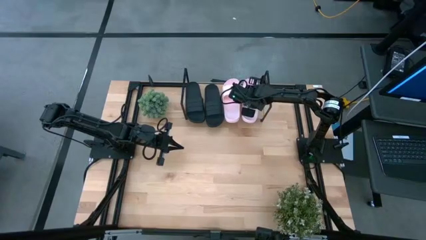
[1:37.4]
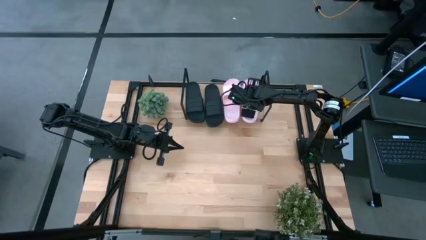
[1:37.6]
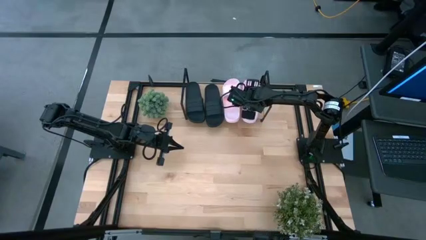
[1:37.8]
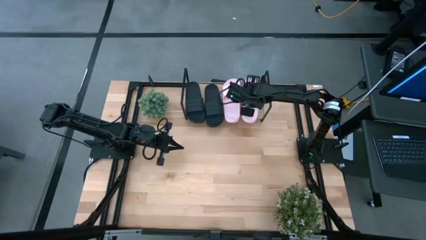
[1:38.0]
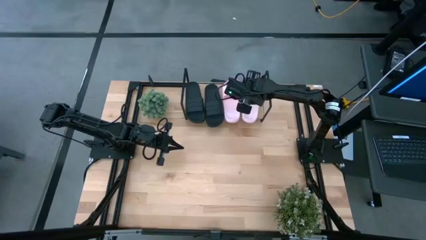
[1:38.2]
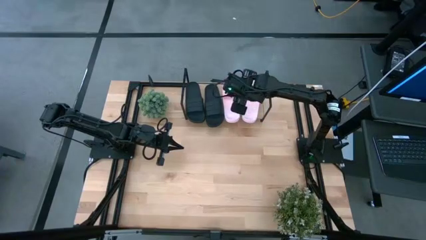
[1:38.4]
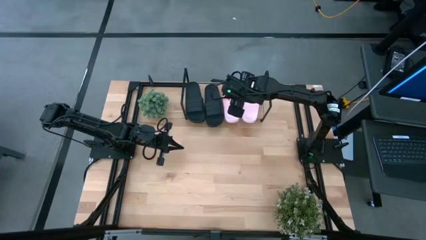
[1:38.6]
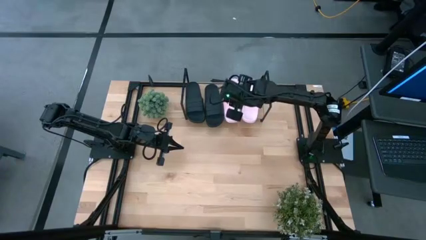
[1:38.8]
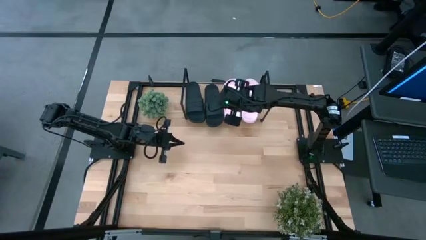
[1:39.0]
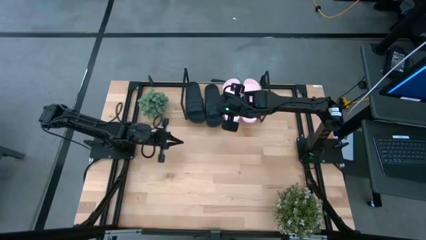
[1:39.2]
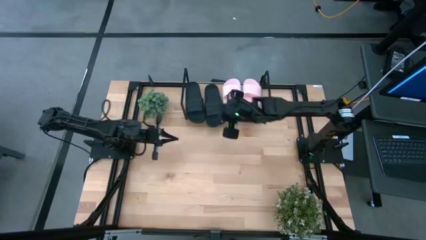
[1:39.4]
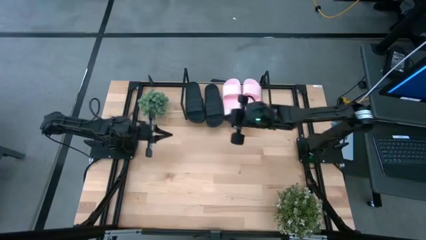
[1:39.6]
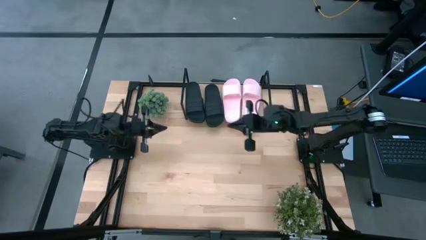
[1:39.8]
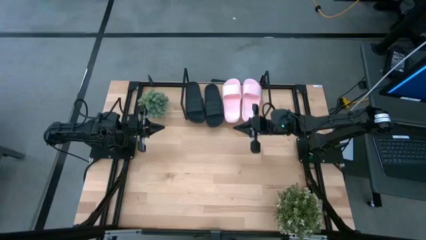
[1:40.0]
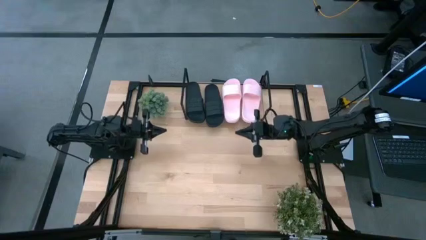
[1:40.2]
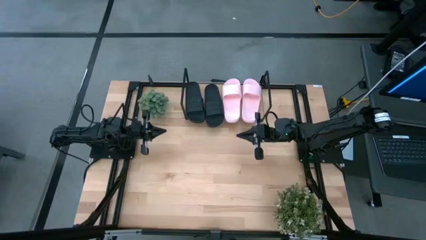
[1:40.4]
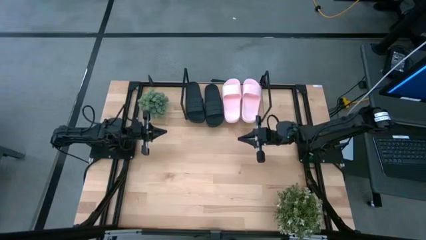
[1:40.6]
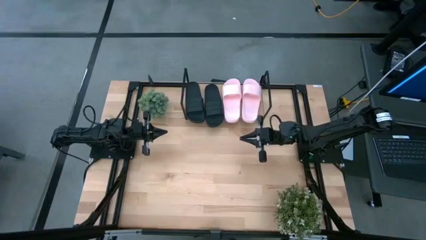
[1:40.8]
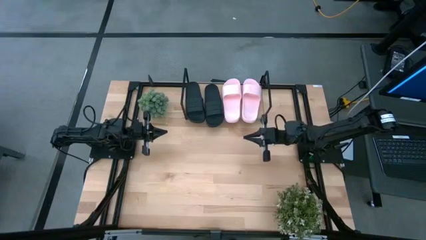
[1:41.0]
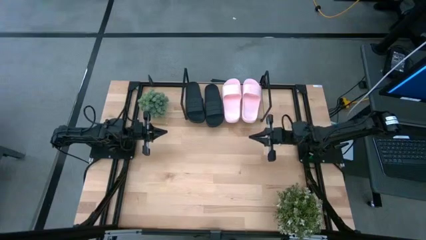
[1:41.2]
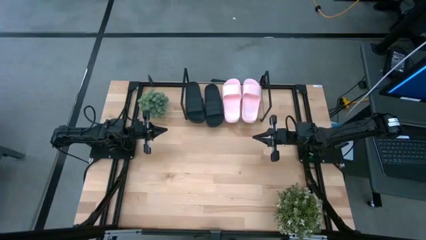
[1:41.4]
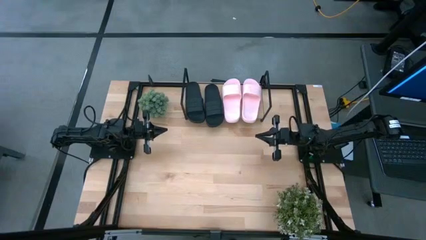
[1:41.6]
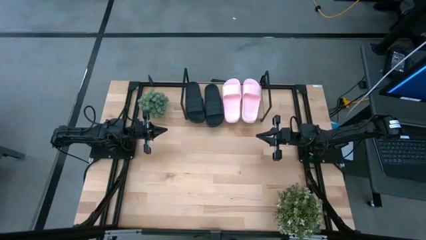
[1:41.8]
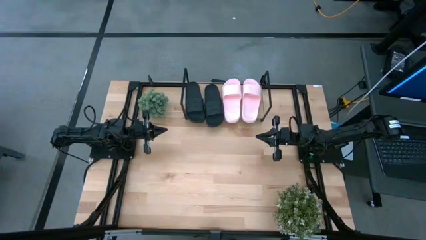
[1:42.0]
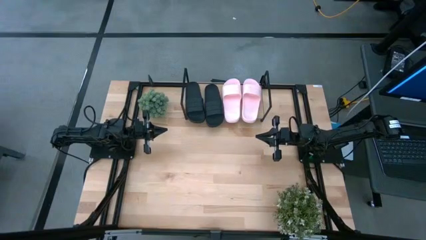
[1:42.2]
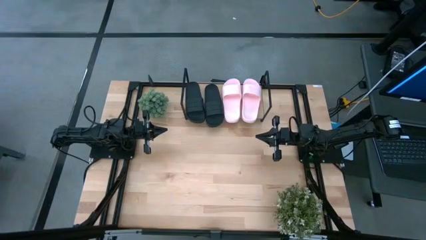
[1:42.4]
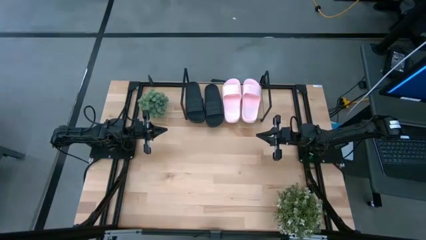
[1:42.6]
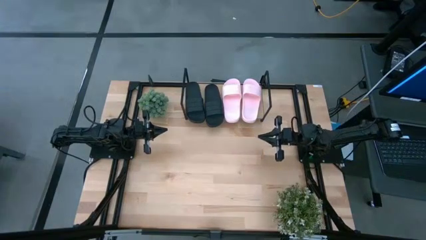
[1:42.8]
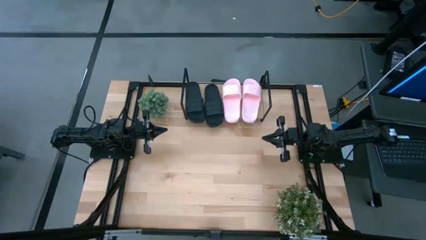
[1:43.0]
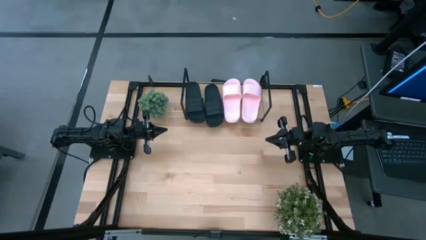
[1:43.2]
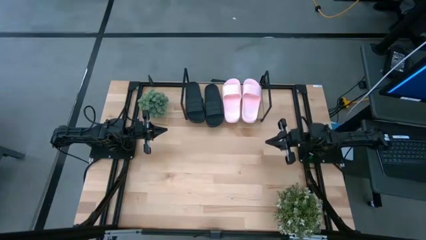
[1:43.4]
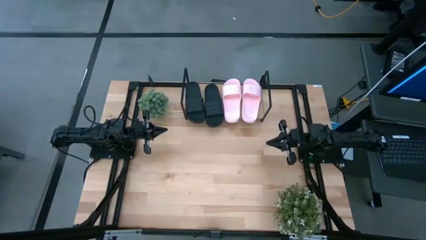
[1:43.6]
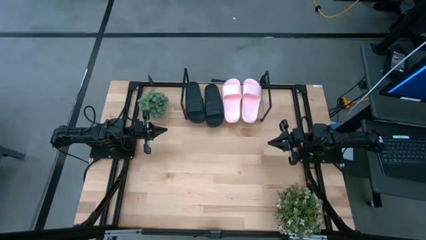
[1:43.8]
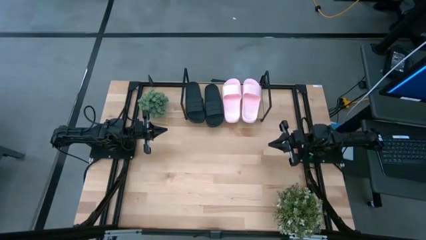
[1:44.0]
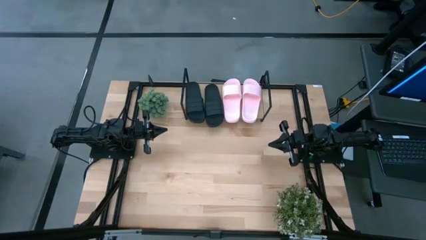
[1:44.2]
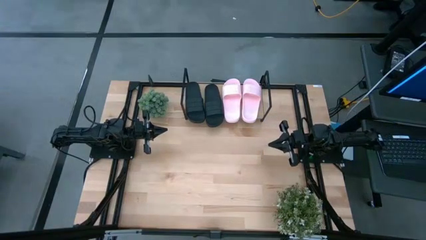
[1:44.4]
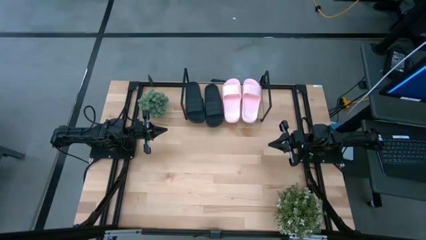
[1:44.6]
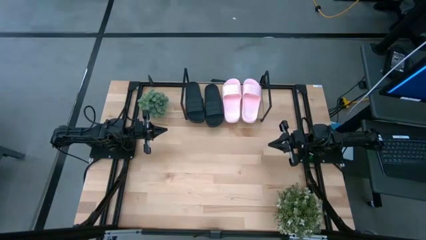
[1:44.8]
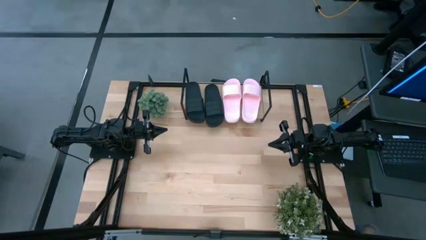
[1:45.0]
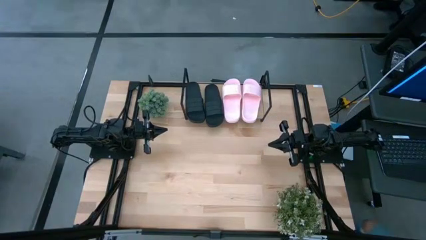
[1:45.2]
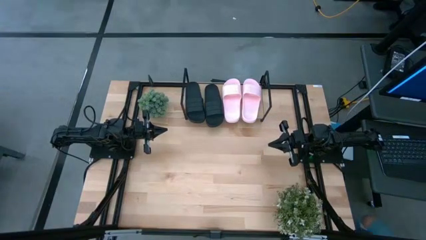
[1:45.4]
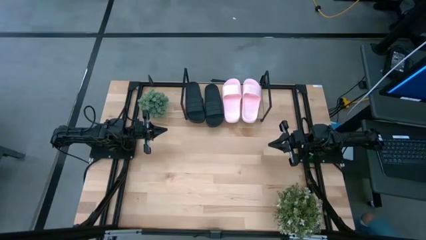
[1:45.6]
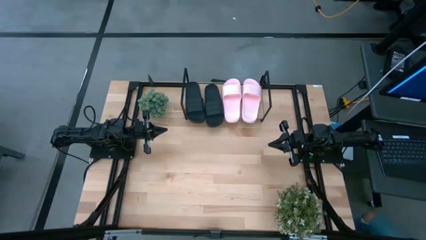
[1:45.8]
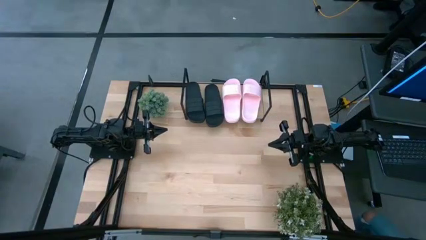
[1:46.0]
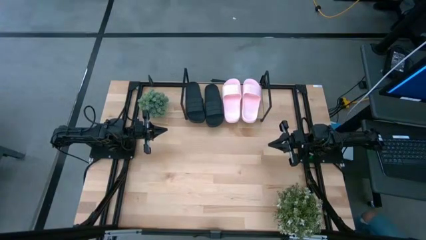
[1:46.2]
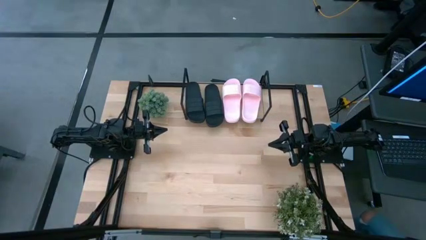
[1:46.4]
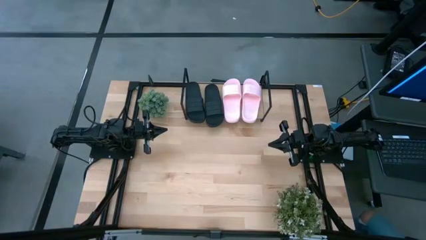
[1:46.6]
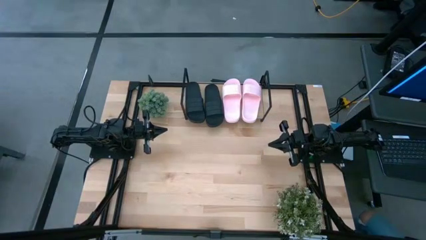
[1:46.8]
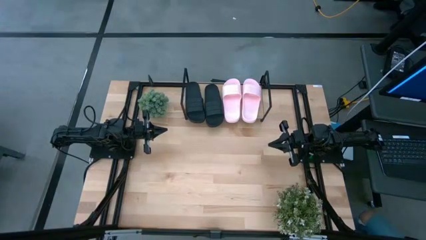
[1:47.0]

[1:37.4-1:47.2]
Task: Pick and place slides into the shelf
Return to Home Position
